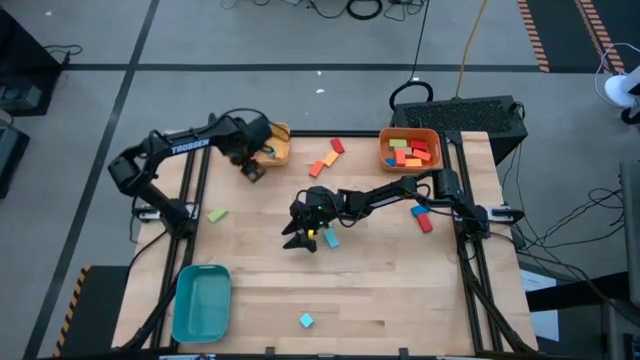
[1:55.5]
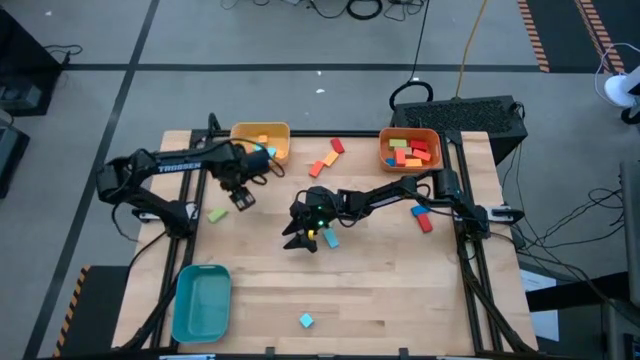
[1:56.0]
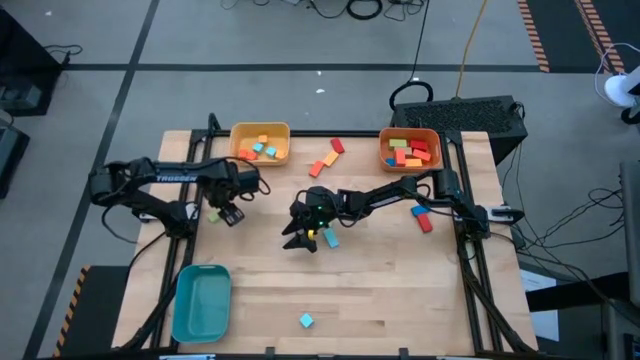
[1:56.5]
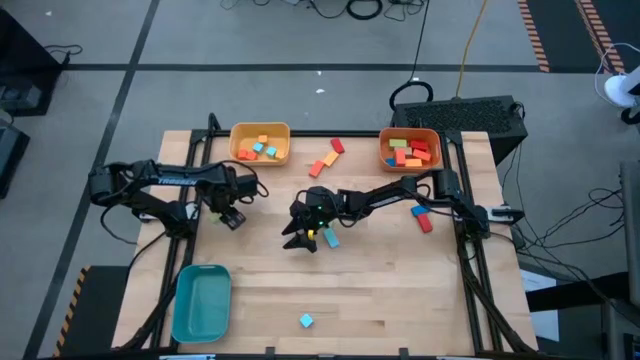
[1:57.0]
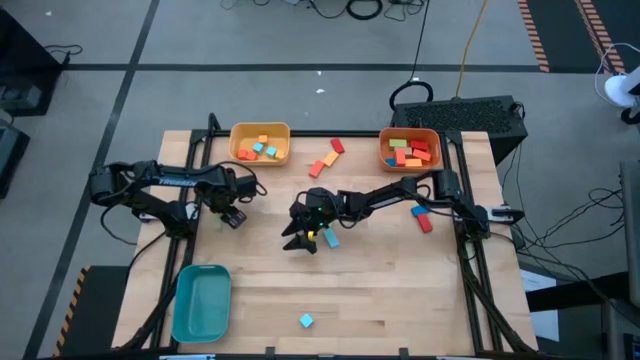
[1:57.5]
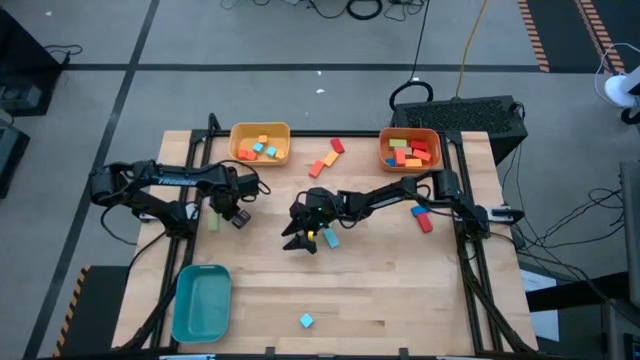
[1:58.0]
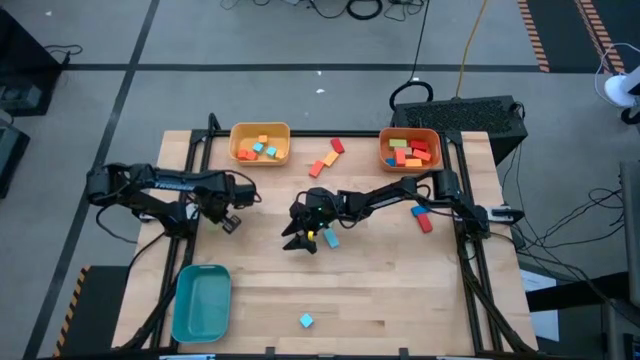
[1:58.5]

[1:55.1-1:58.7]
Task: Sort blocks by size
Move the large green block to the center of the table

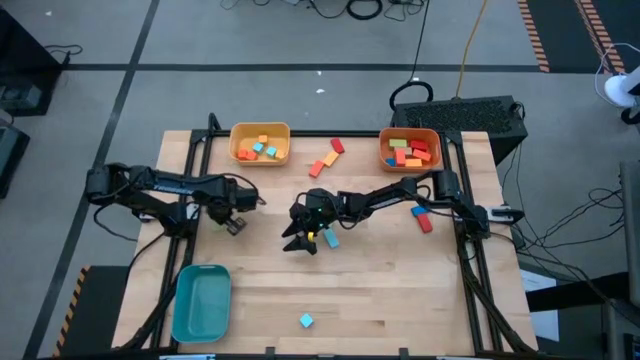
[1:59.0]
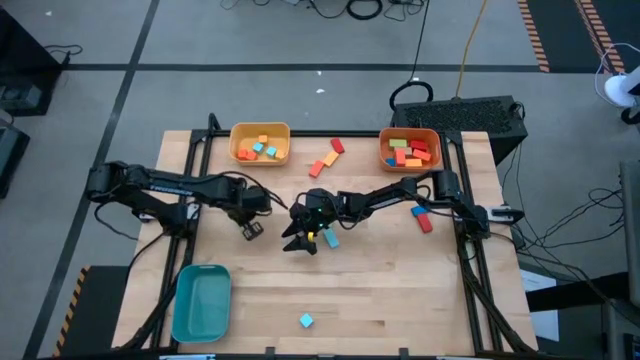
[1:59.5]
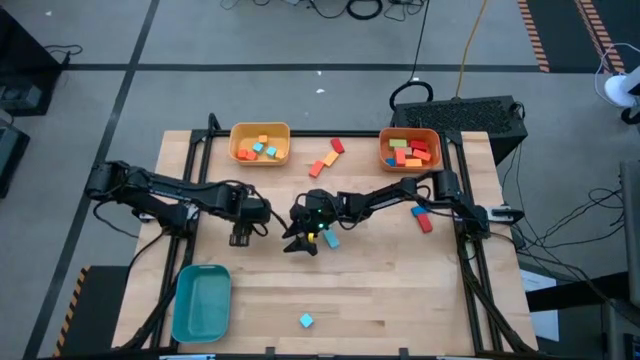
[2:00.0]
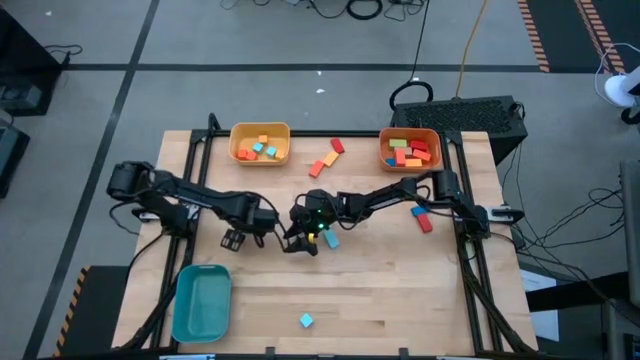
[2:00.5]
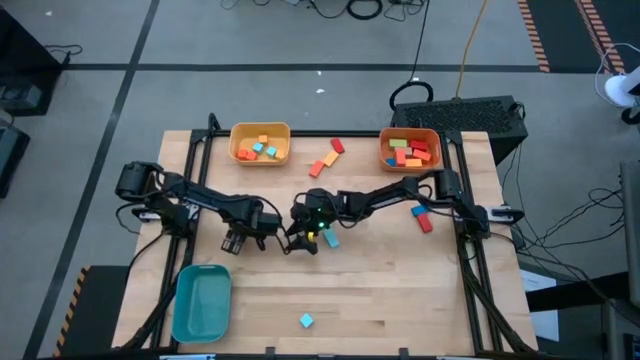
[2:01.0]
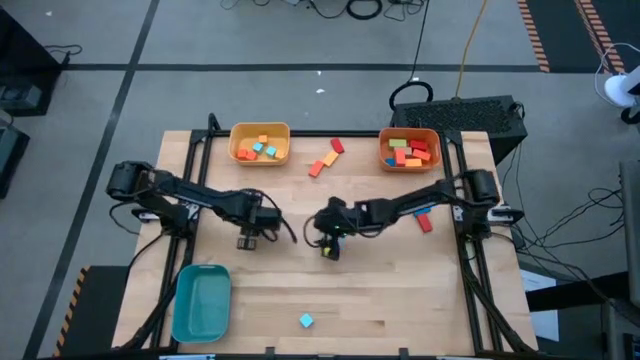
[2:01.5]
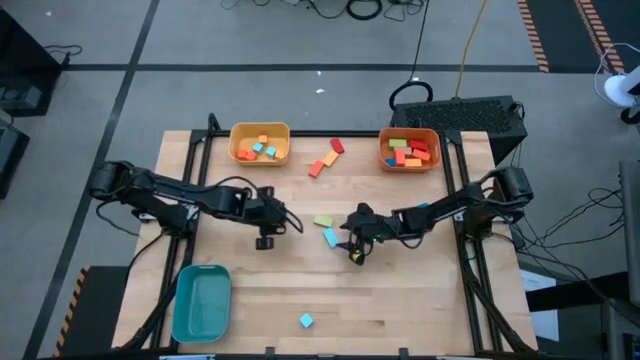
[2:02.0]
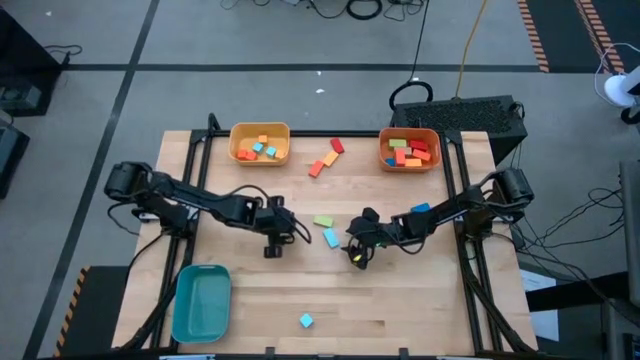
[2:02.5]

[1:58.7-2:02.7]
Move the large green block to the center of the table

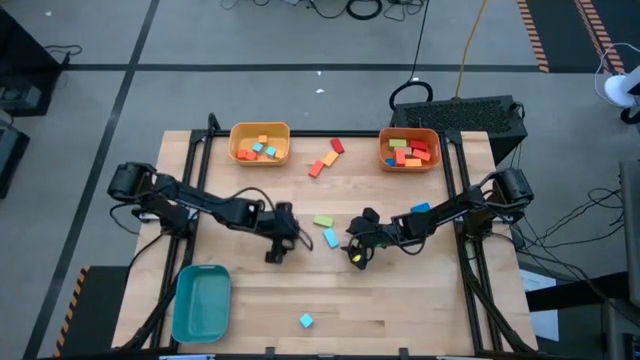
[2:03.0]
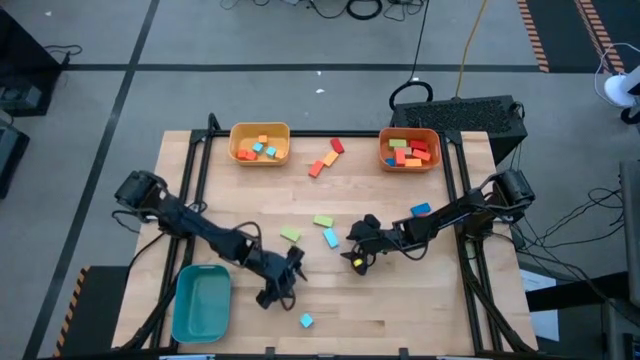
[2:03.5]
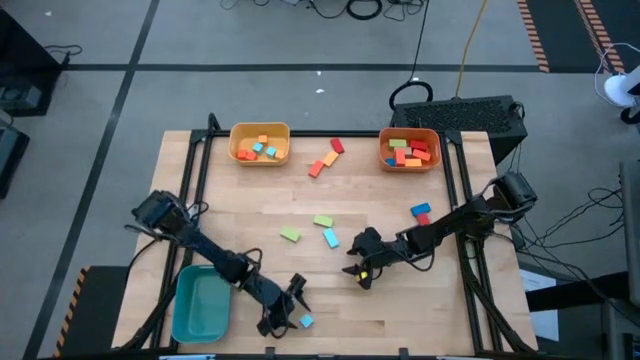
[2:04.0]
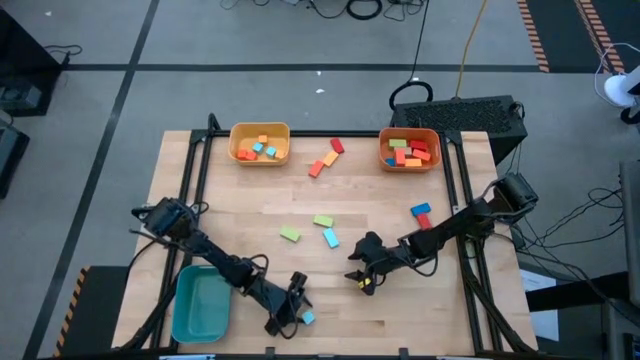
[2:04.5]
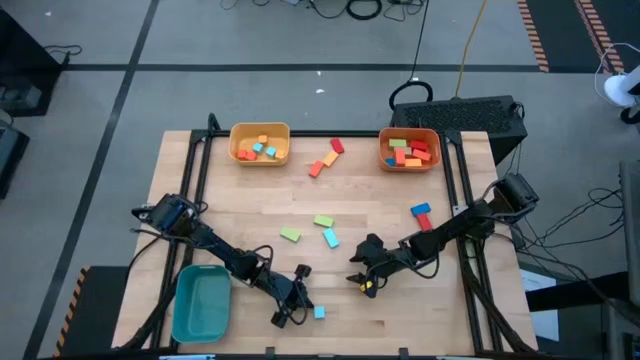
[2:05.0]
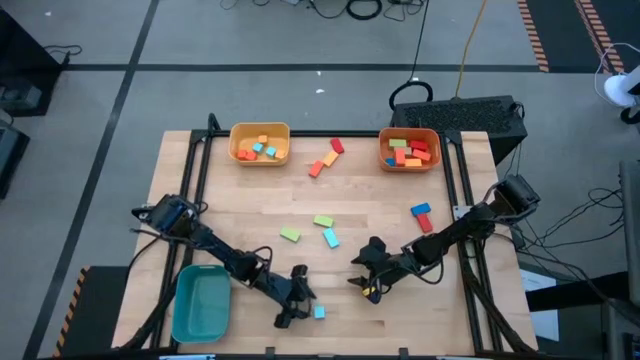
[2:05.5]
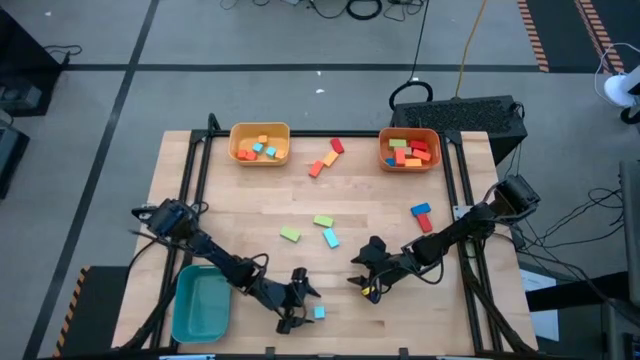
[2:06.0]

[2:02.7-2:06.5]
Put the small light blue block into the yellow bin

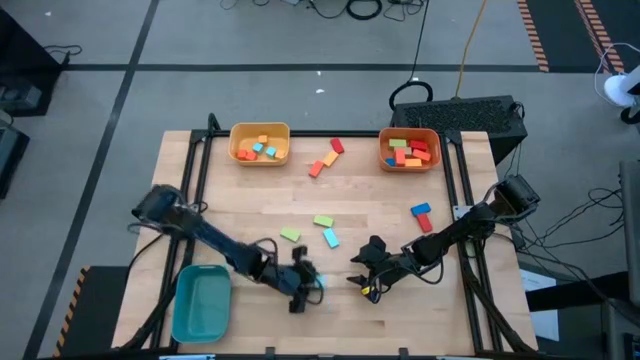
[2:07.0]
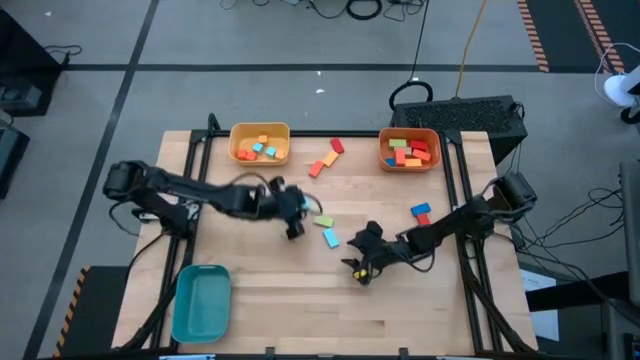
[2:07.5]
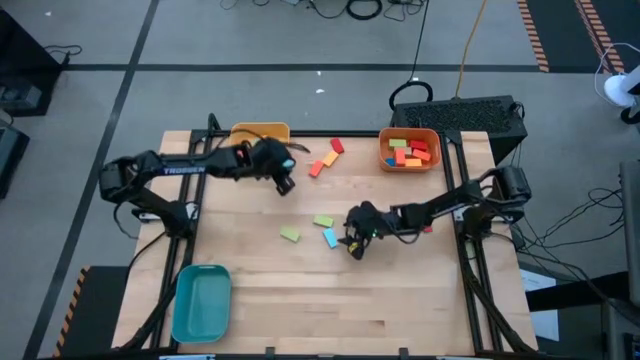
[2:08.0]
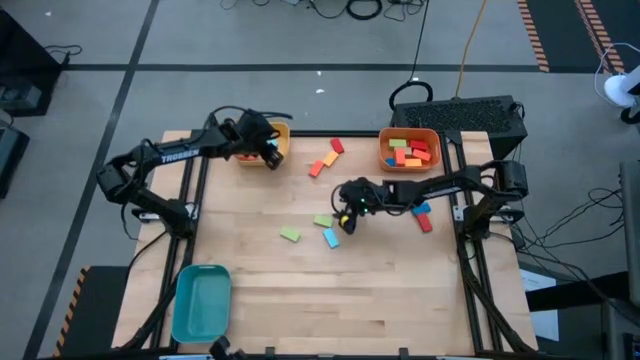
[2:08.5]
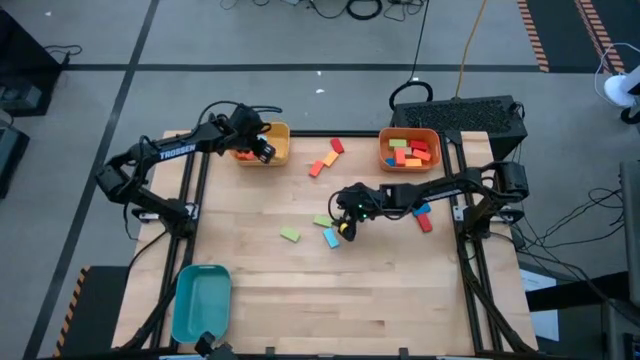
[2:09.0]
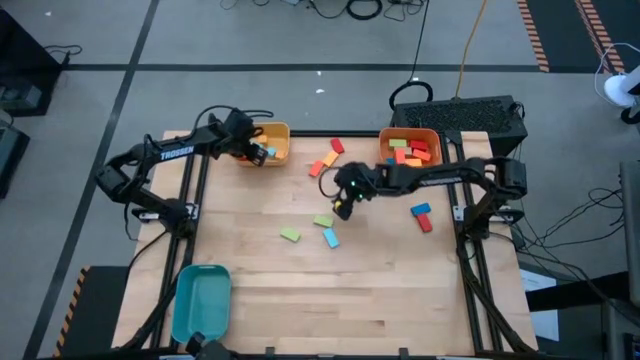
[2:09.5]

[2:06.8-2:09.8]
Put the small light blue block into the yellow bin

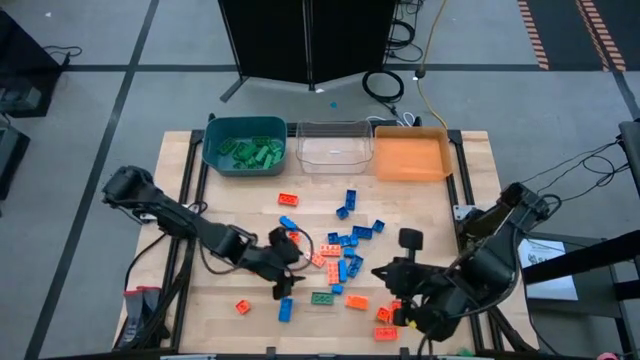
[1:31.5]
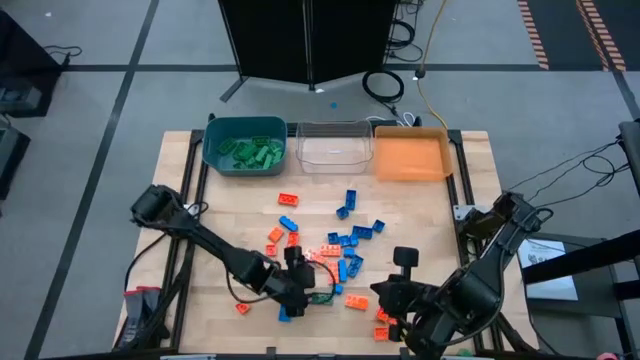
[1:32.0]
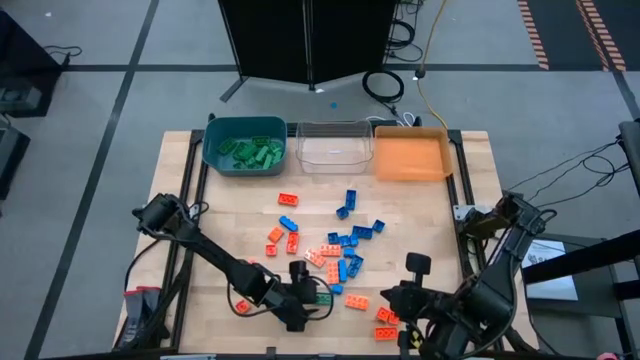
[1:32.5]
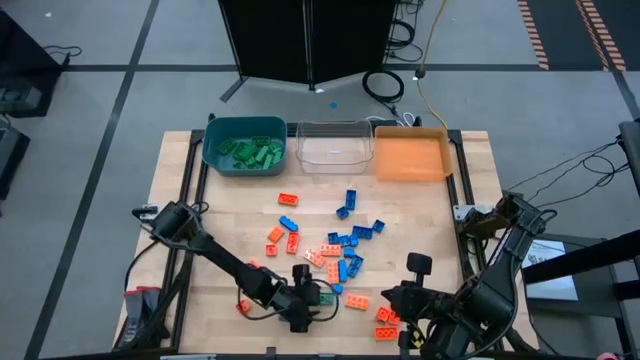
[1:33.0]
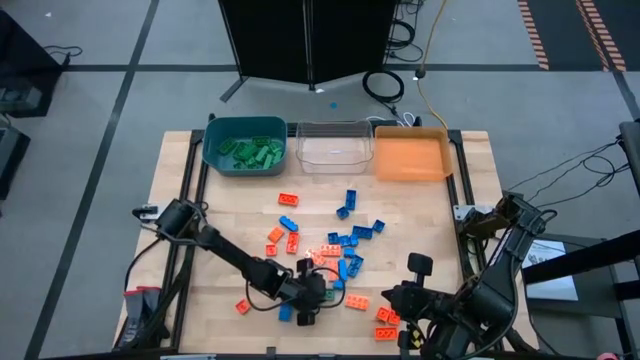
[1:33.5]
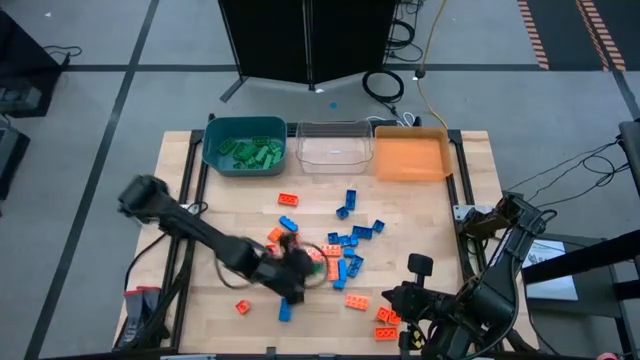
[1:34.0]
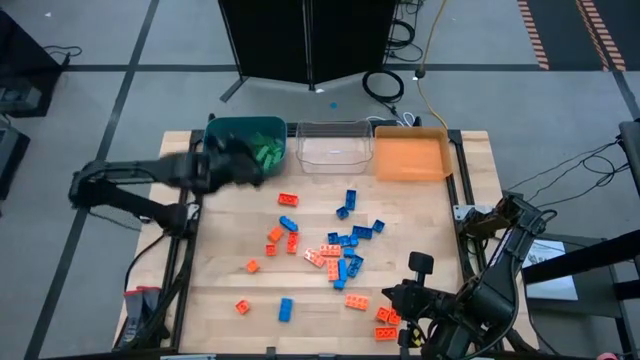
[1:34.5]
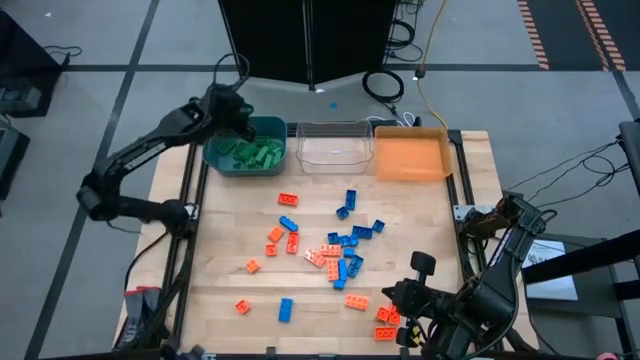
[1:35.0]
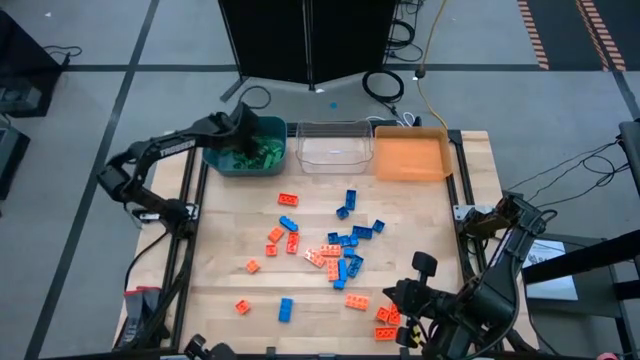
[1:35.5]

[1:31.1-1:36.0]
Task: Sort blocks
Put the green game piece into the blue bin
